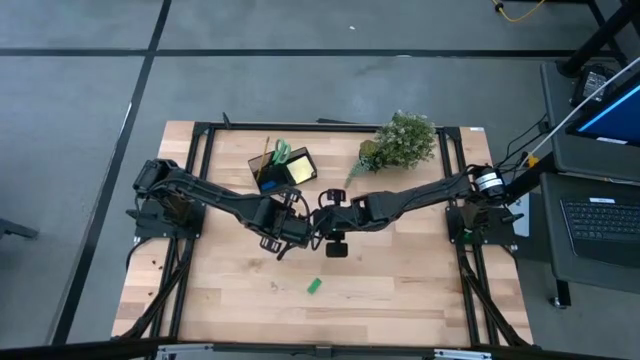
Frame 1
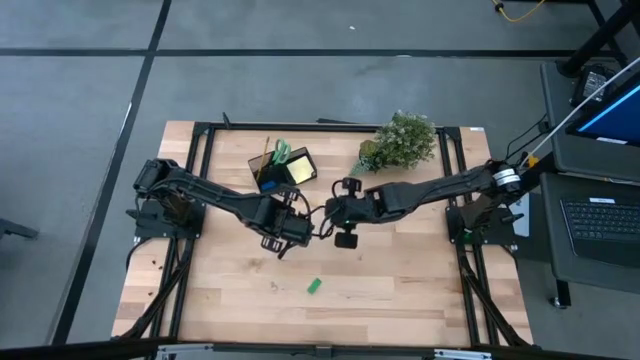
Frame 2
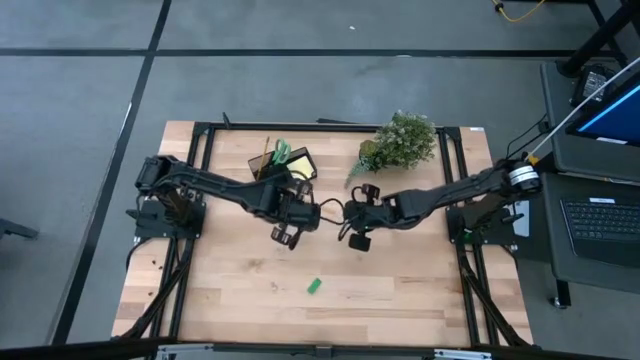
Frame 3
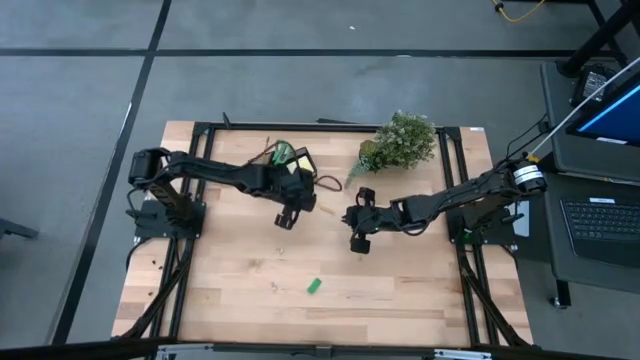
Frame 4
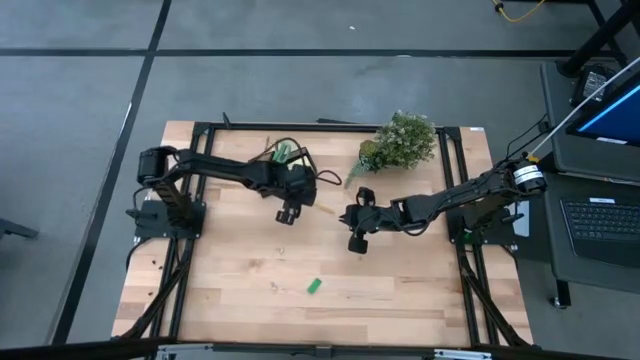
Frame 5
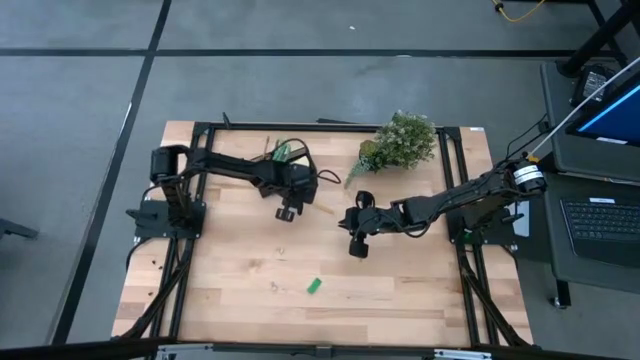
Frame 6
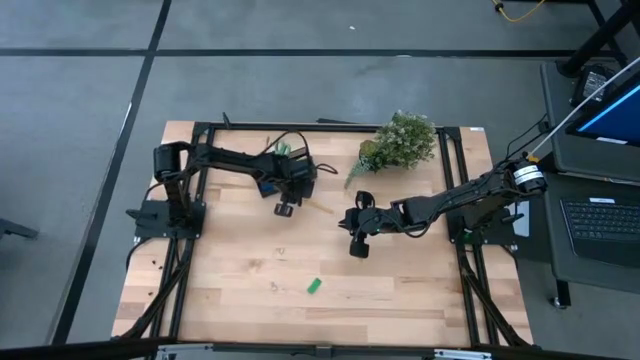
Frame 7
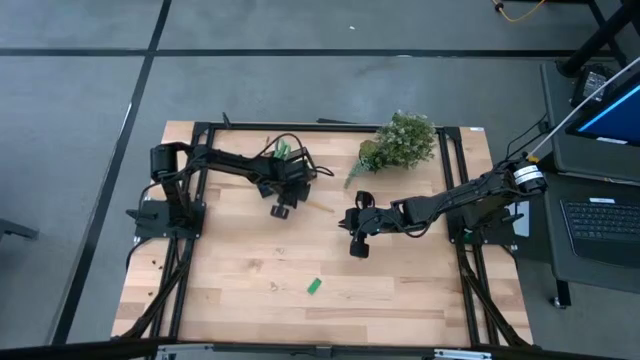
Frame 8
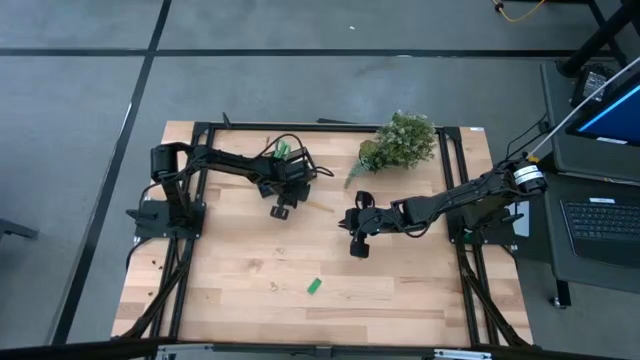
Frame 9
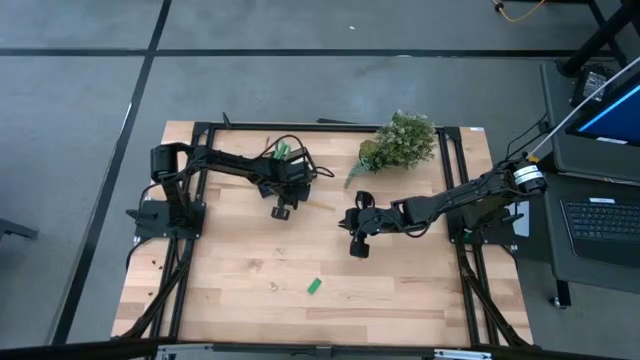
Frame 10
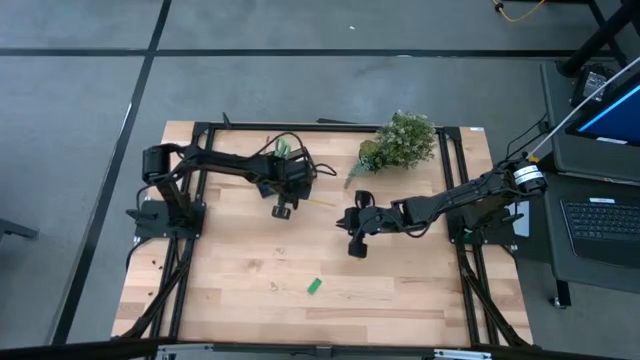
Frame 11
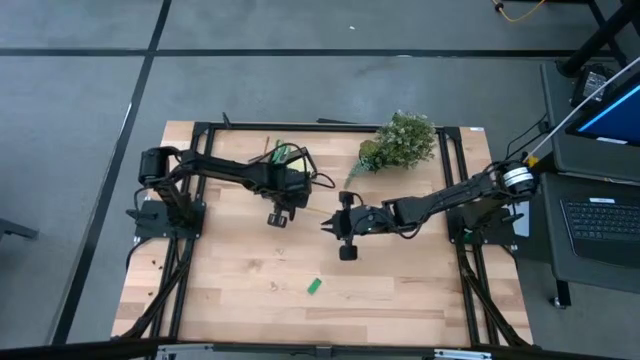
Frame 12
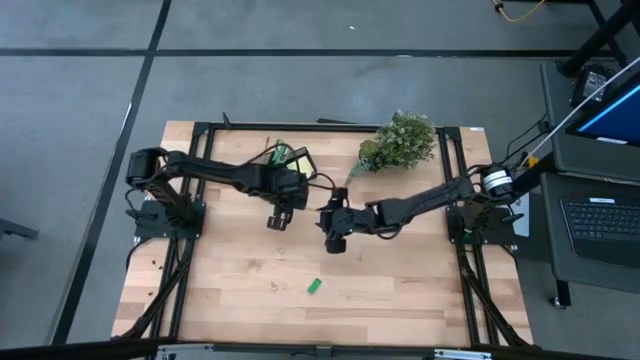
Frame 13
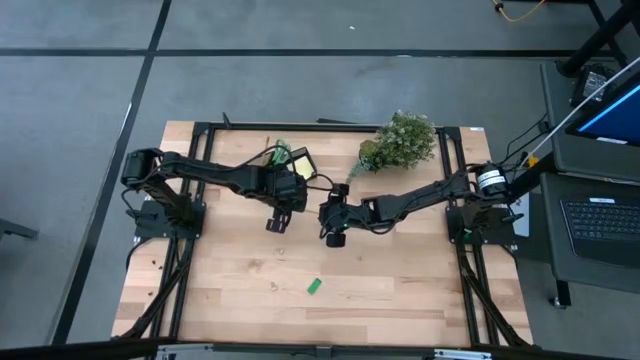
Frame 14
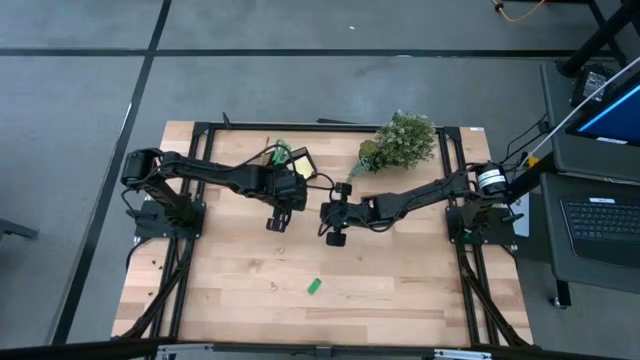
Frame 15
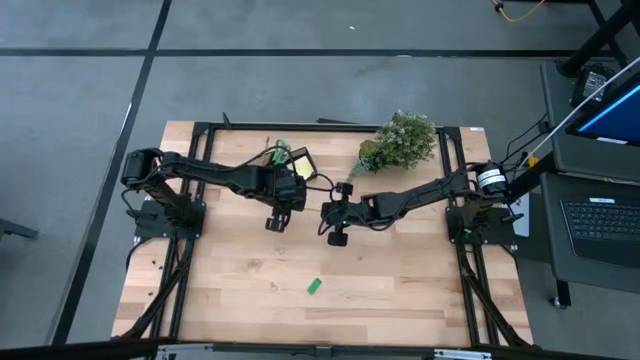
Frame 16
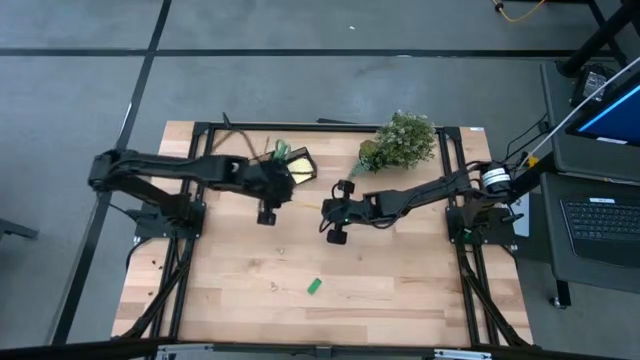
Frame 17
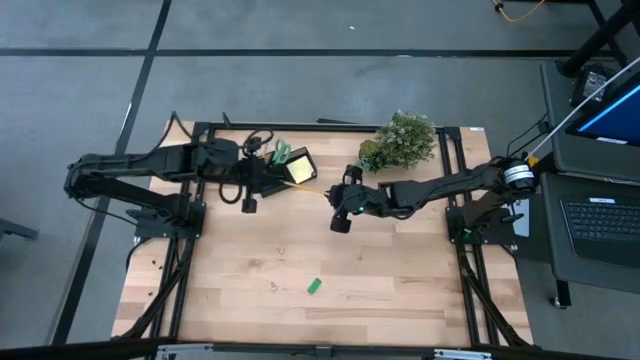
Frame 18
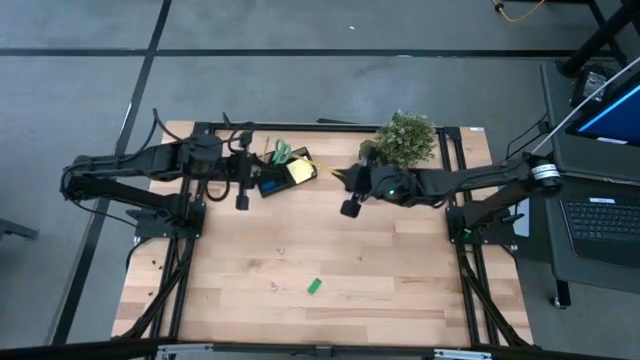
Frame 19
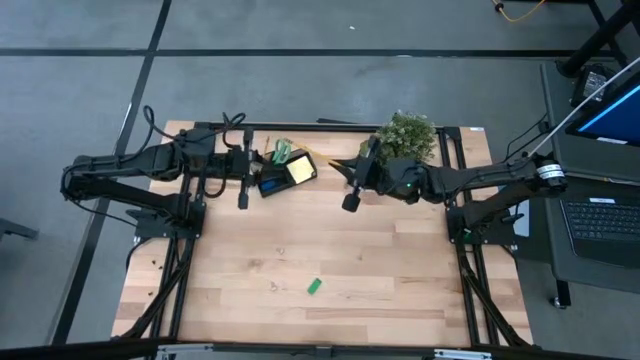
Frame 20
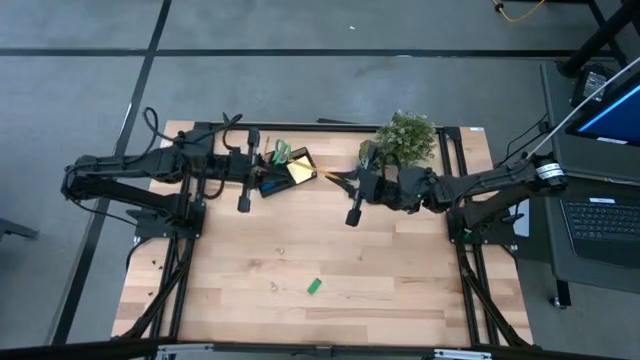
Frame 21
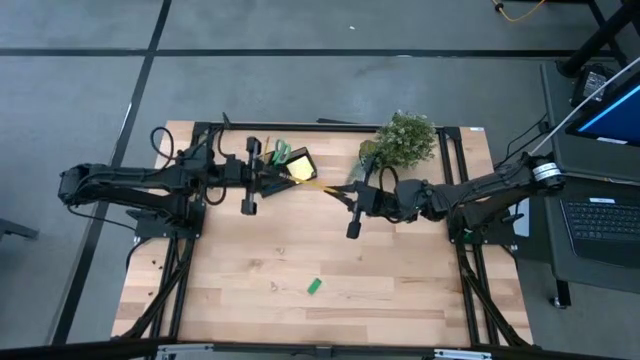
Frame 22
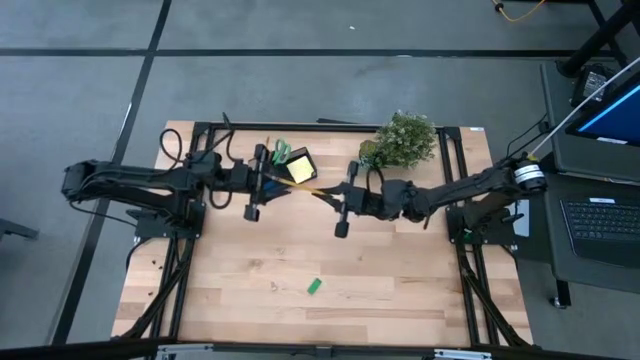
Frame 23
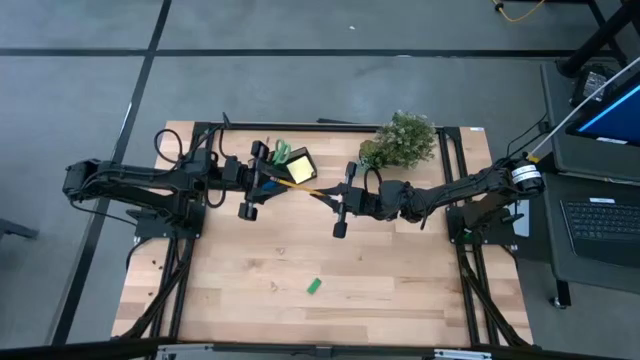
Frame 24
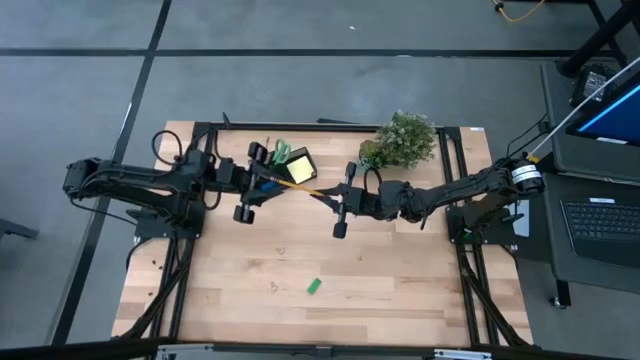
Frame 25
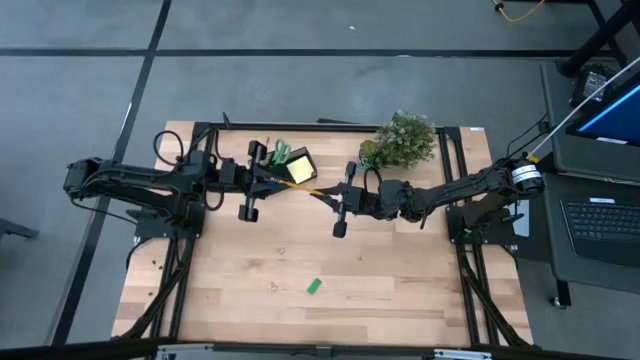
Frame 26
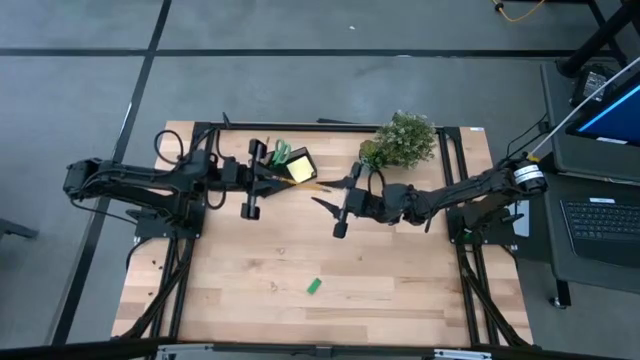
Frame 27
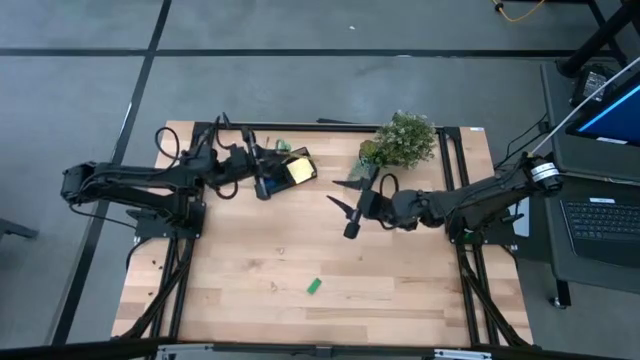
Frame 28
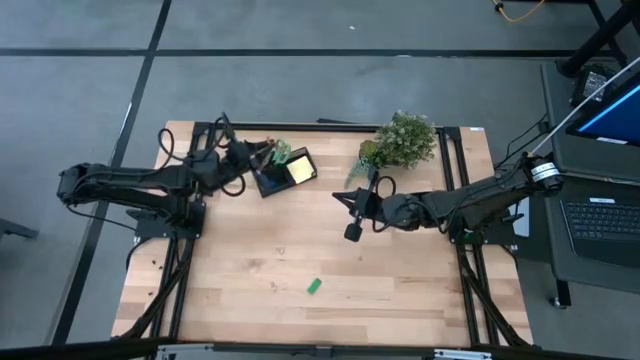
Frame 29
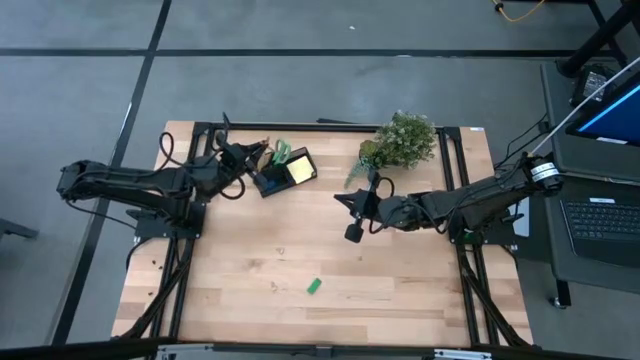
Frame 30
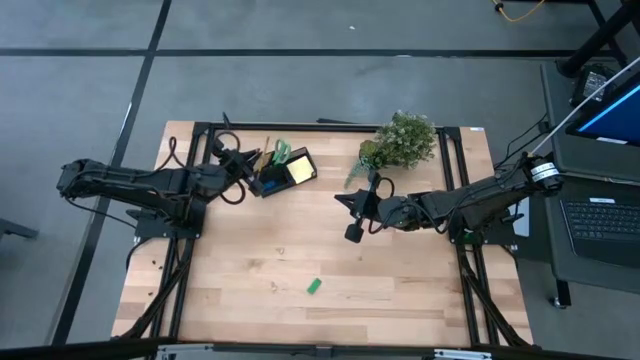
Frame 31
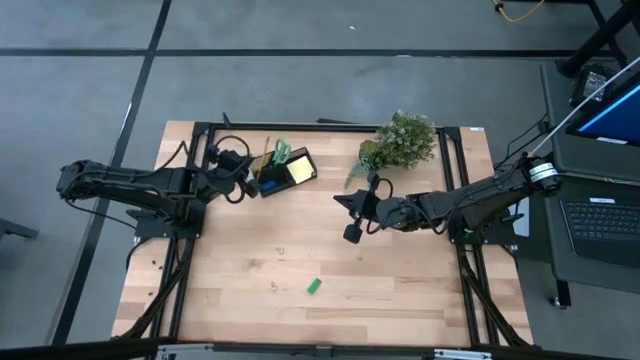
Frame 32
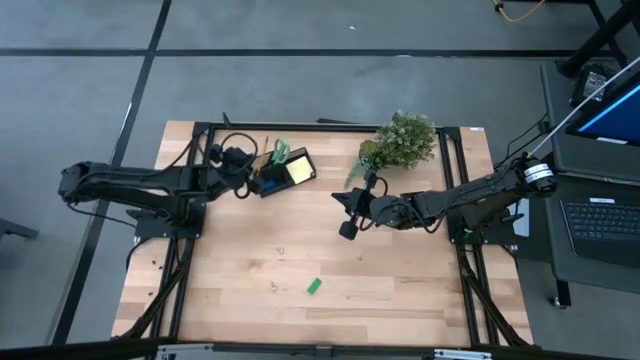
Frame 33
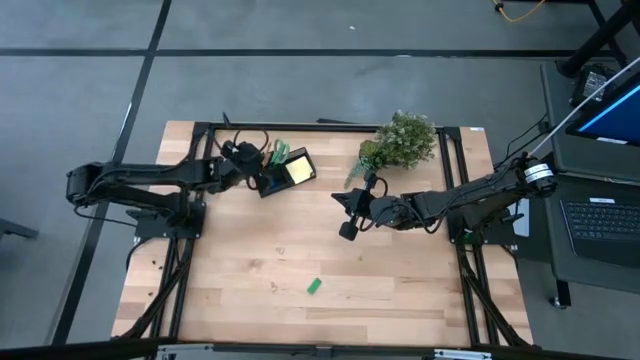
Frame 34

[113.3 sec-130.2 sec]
Task: Pick and place office supplies into organizer
Put the yellow pencil into the desk organizer

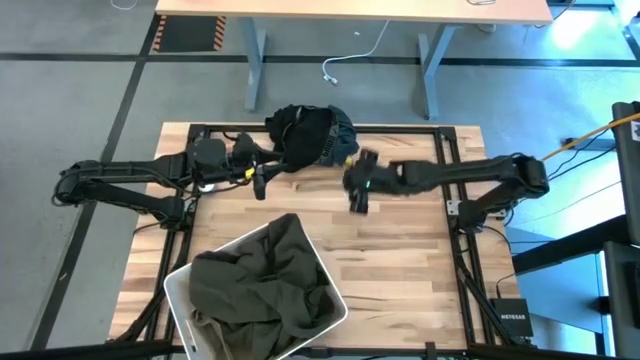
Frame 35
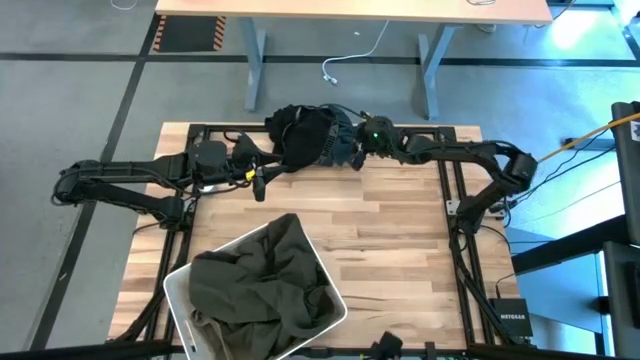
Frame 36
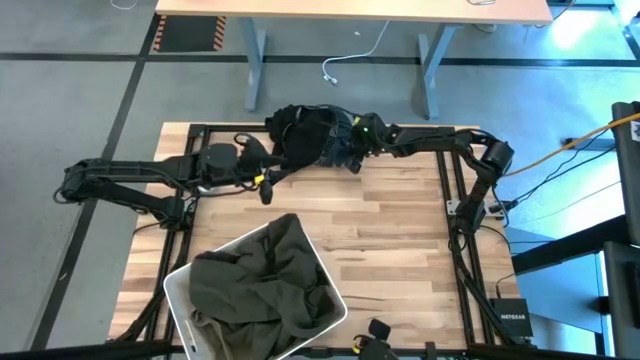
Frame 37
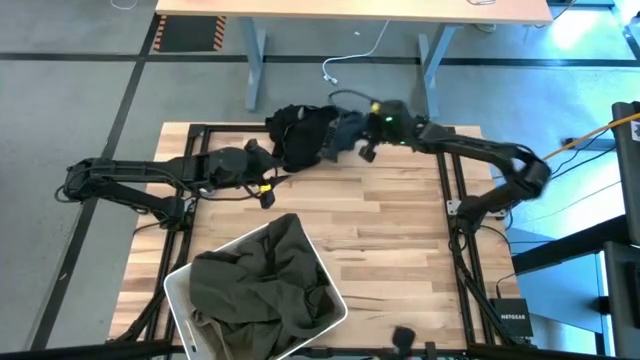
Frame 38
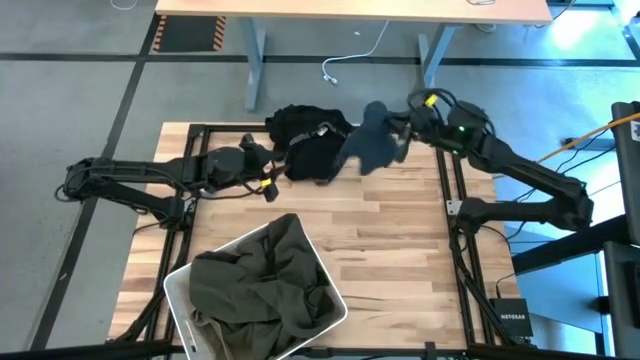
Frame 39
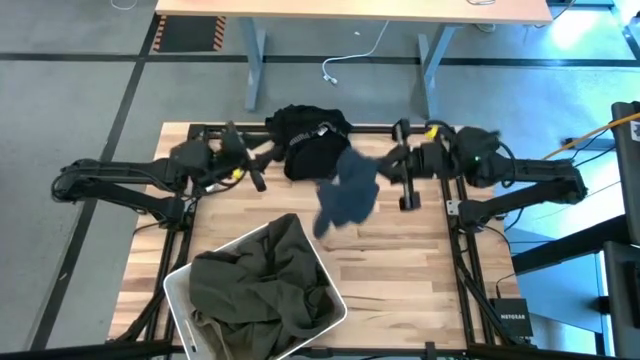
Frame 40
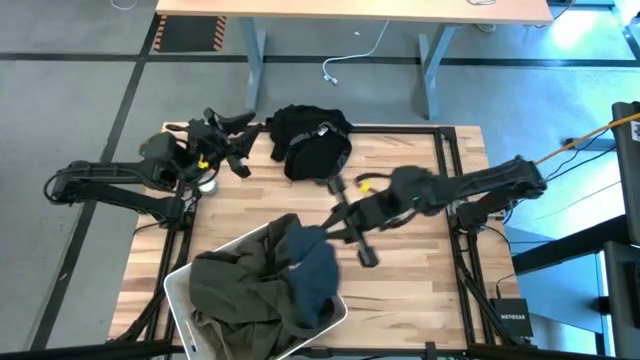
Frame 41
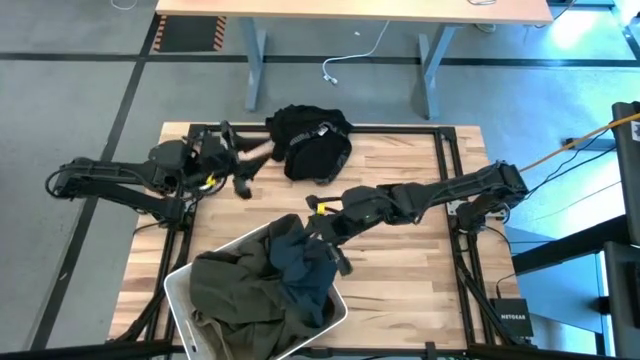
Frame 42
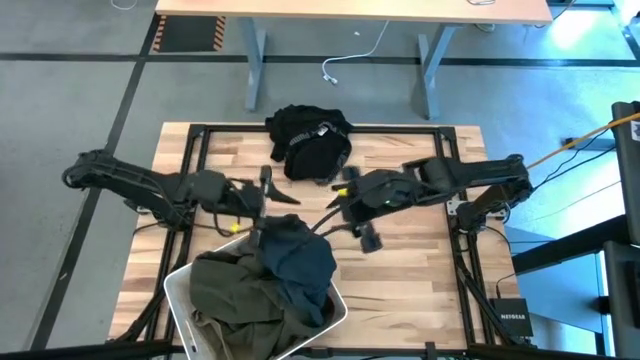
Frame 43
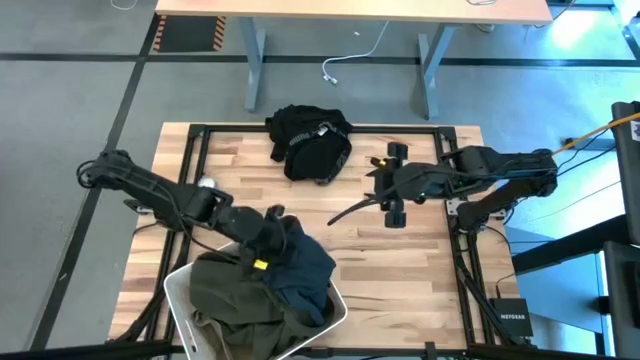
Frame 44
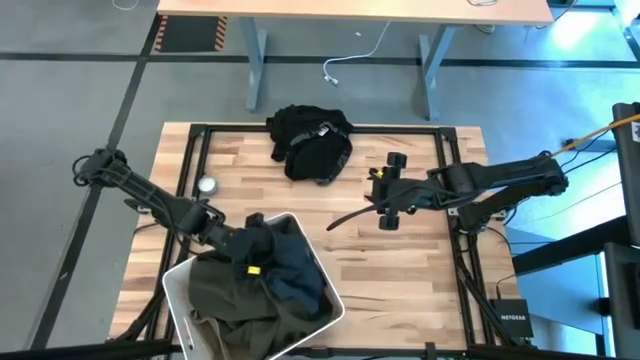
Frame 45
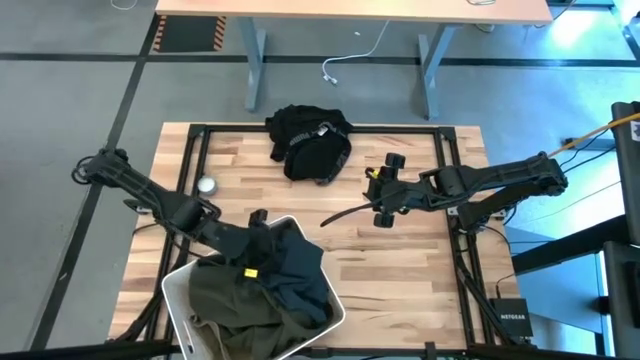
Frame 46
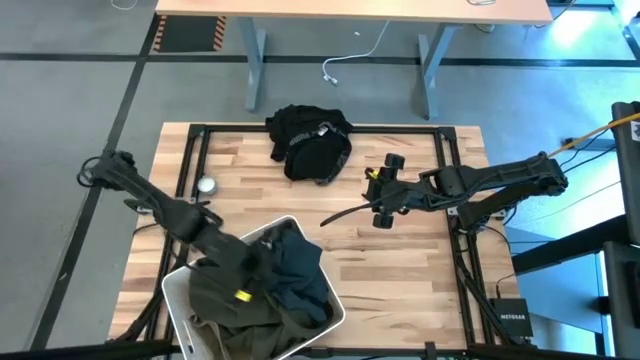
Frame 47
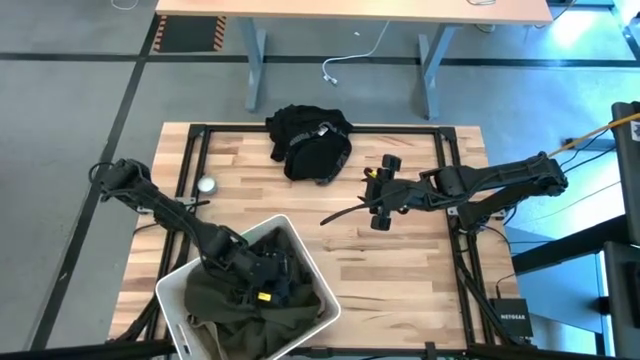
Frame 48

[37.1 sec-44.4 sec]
Task: Sort clothes
Put the dark blue underwear into the white bin
